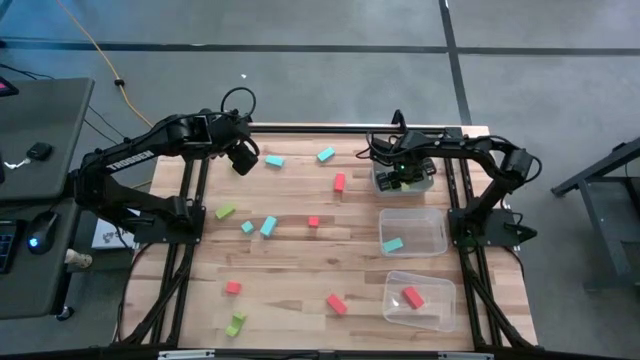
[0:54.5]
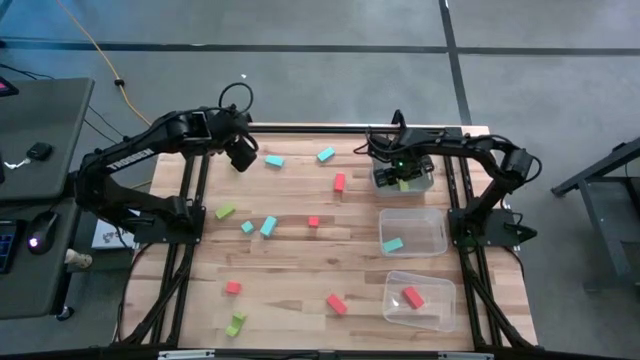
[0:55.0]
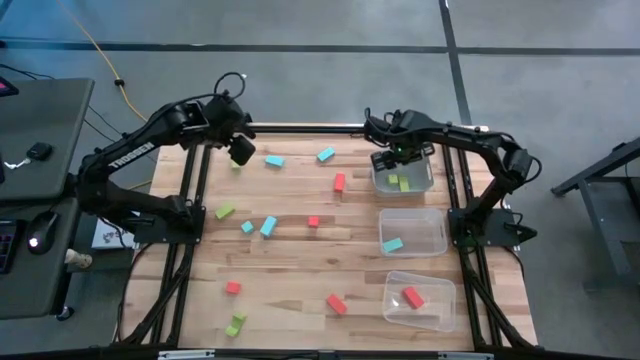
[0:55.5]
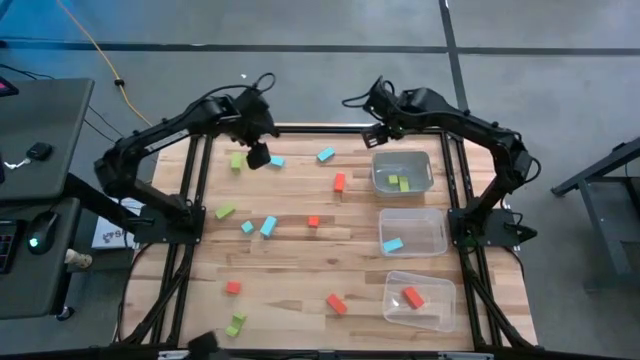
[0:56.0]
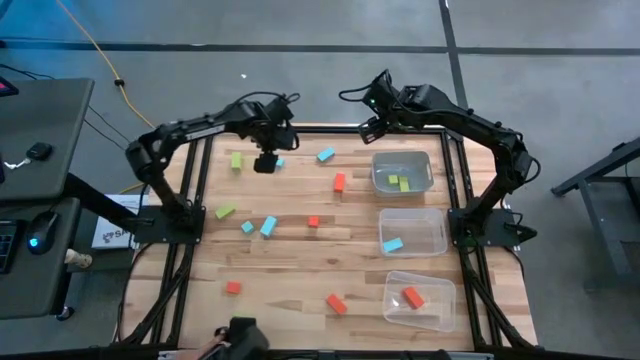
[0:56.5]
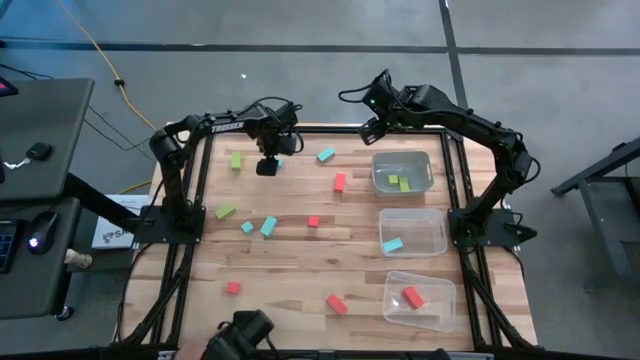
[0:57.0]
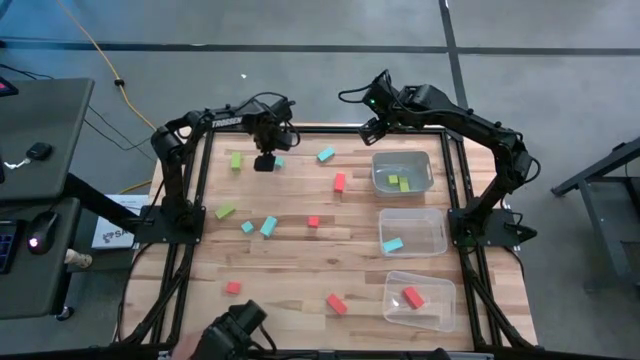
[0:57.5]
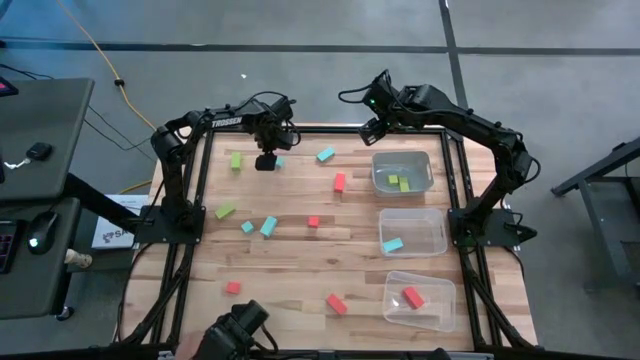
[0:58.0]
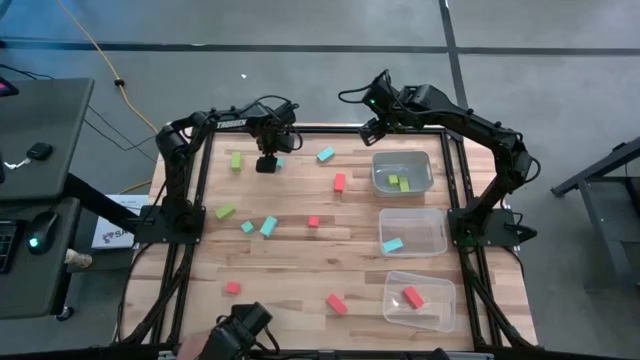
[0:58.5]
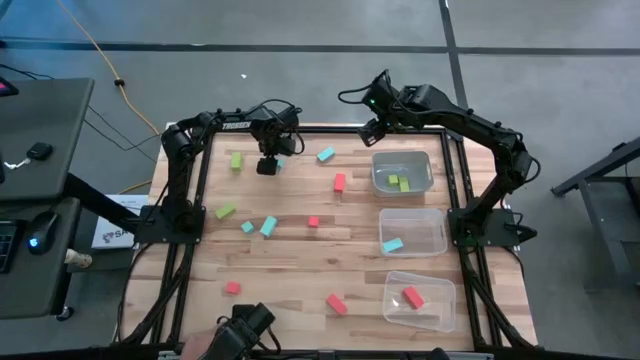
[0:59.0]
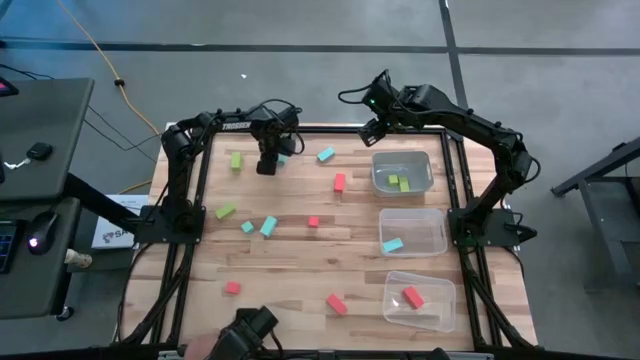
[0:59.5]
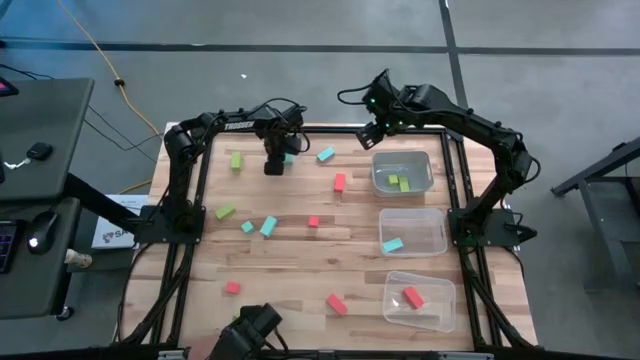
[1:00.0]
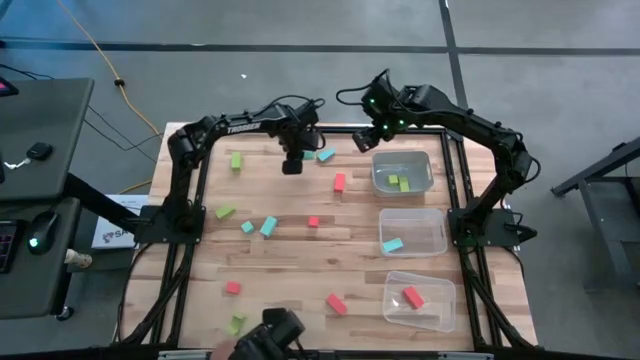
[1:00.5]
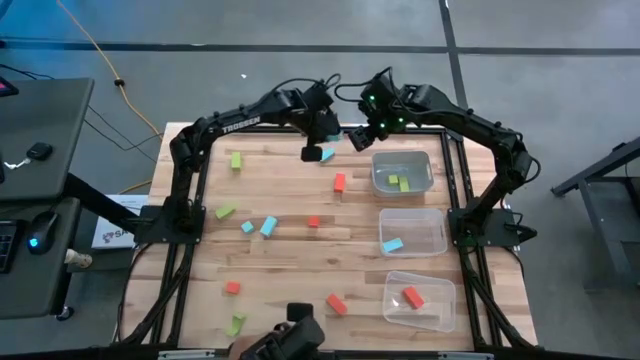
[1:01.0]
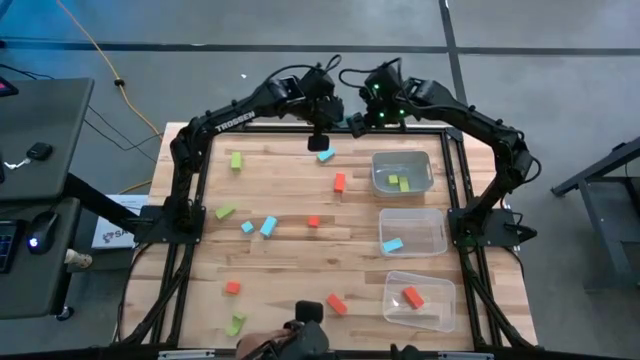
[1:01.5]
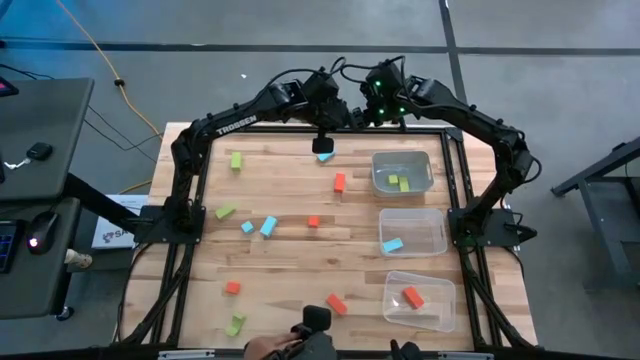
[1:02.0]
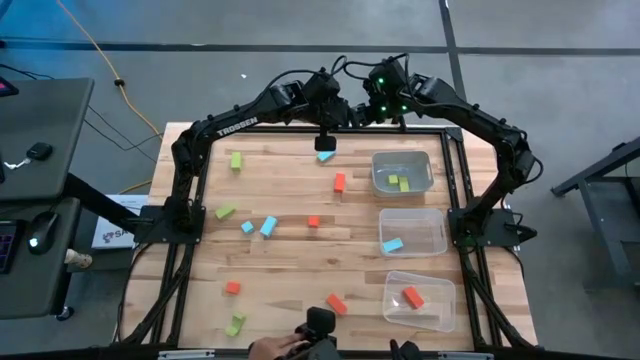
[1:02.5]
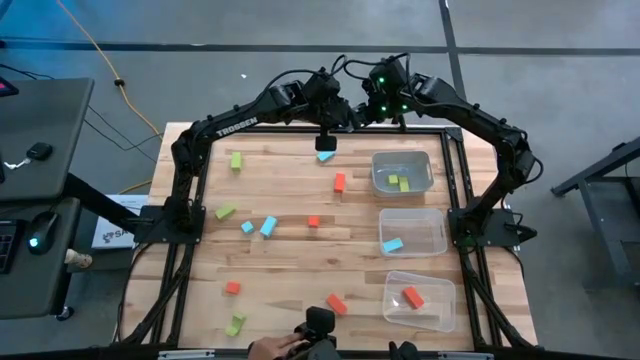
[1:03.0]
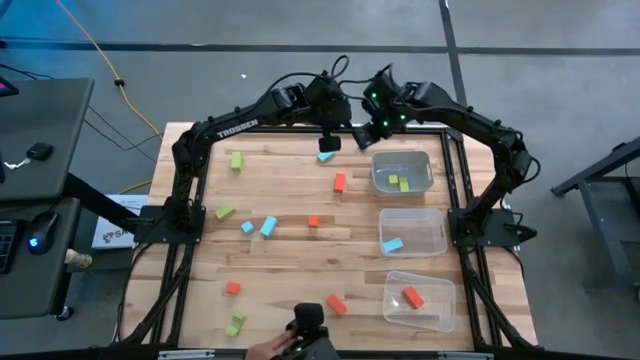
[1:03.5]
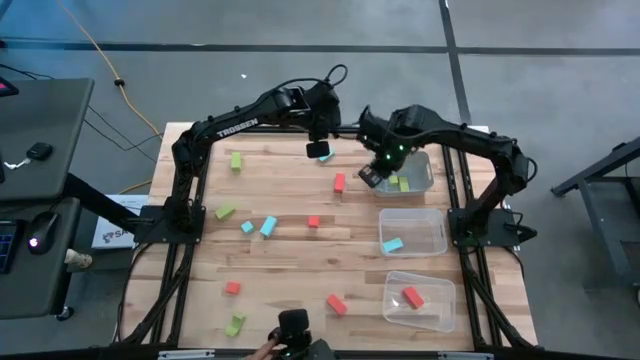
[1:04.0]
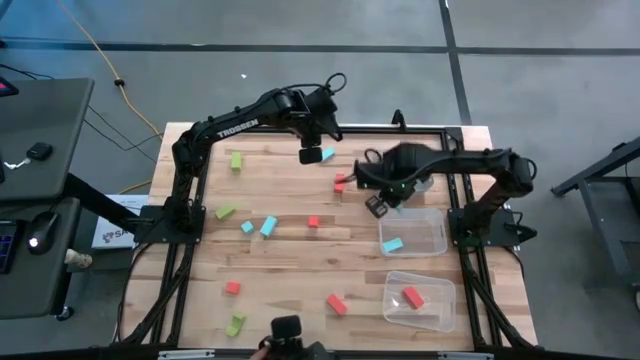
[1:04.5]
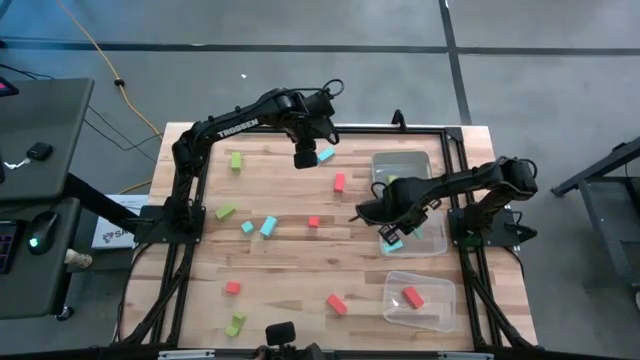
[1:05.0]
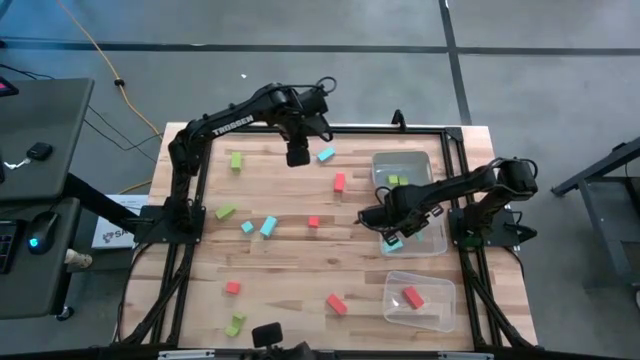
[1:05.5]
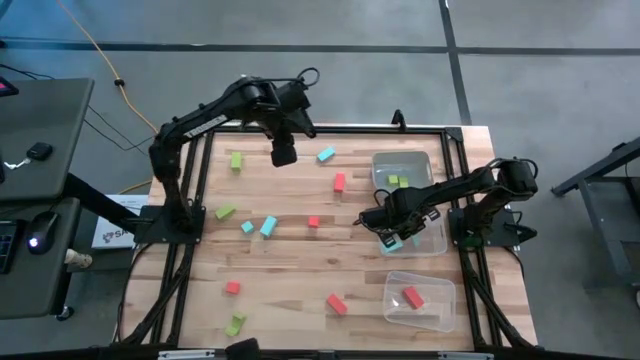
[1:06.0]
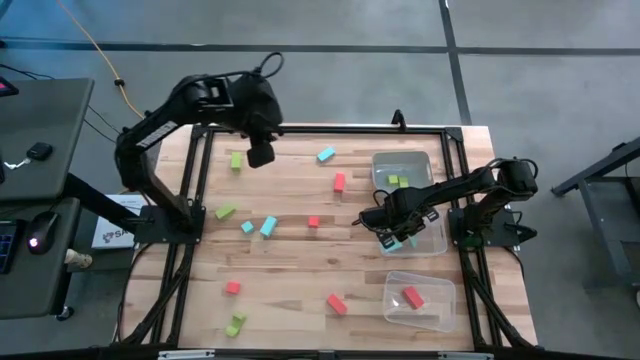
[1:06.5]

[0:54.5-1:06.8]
Task: Sort & place blocks by color
Put the light blue block into the top transparent bin

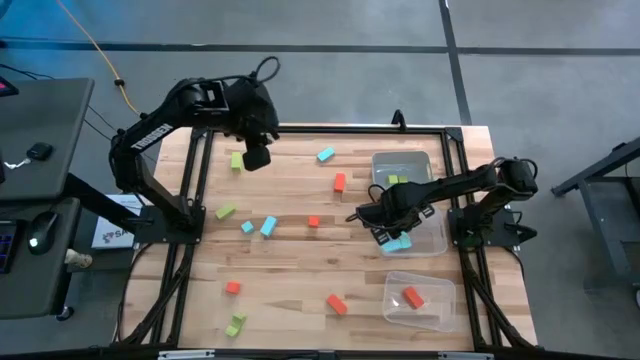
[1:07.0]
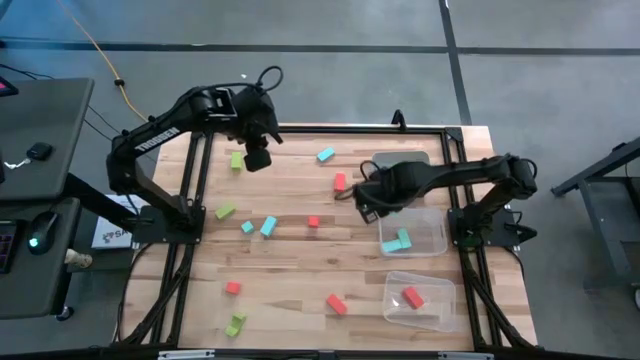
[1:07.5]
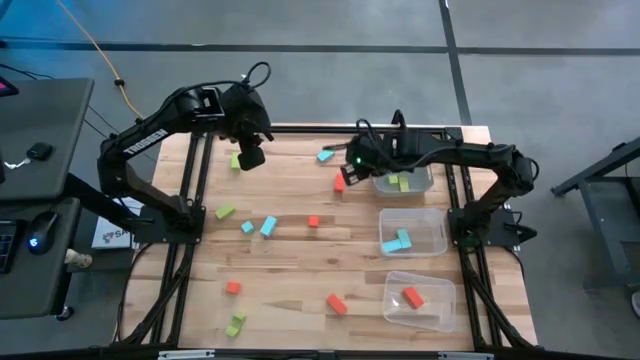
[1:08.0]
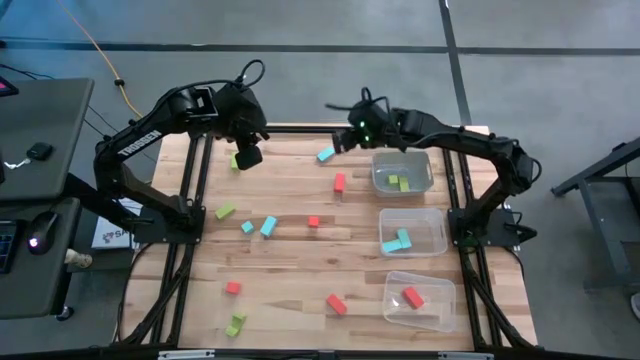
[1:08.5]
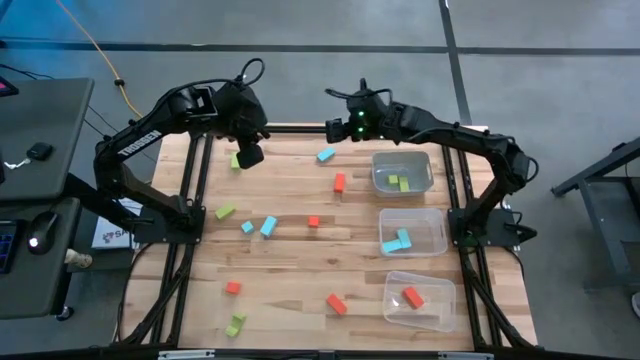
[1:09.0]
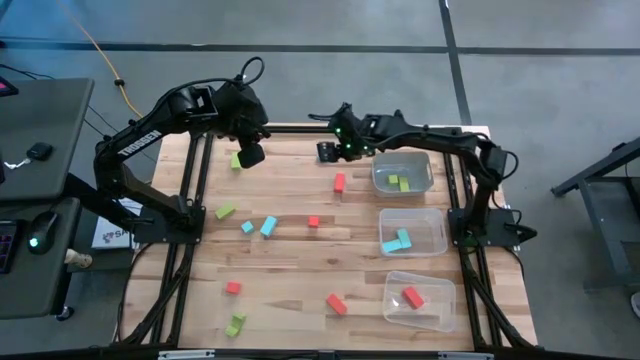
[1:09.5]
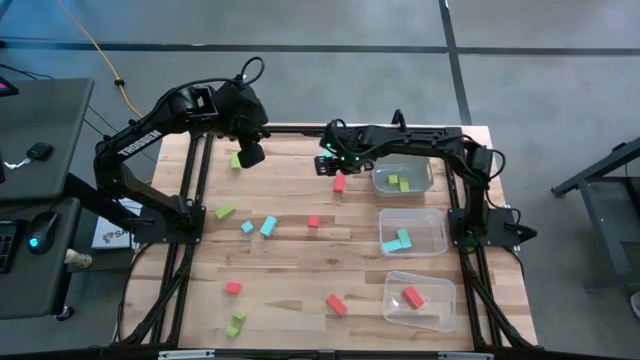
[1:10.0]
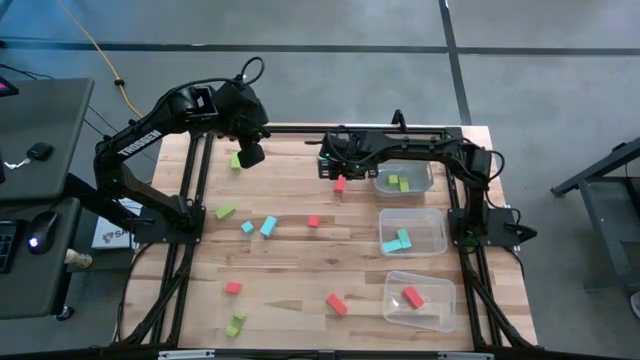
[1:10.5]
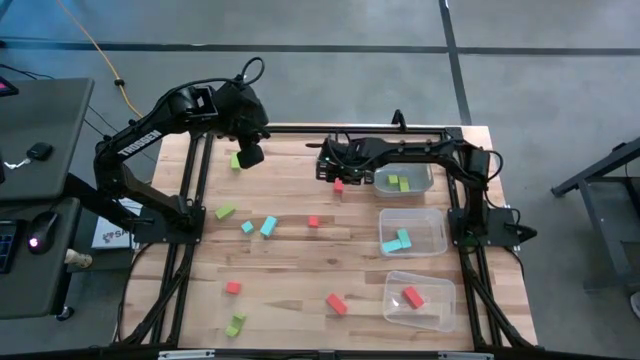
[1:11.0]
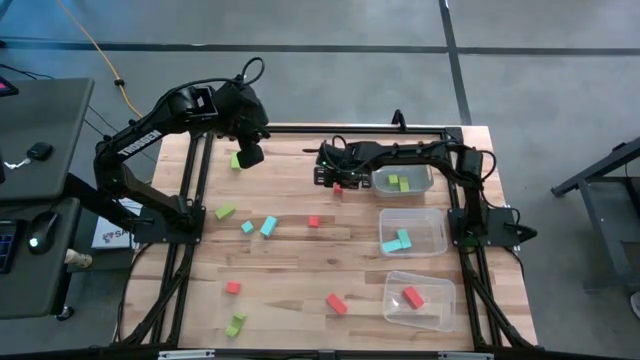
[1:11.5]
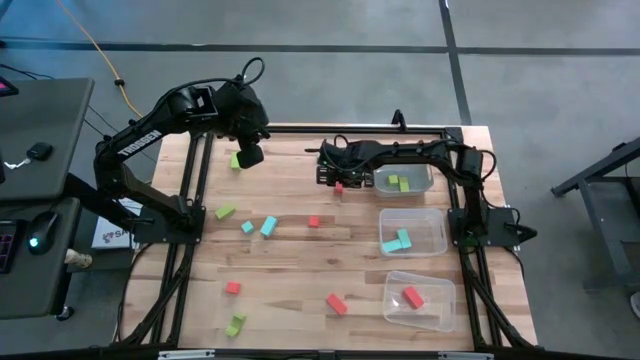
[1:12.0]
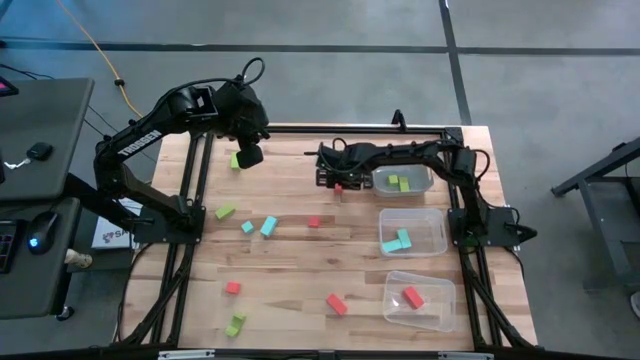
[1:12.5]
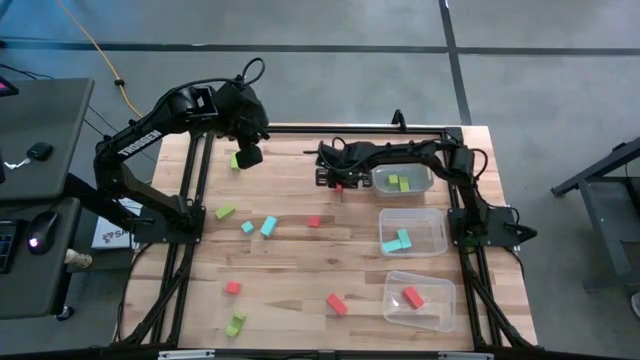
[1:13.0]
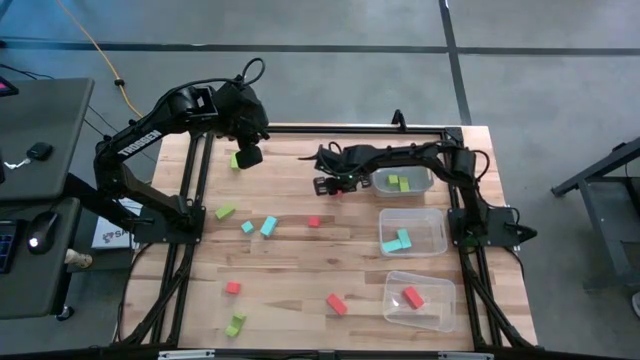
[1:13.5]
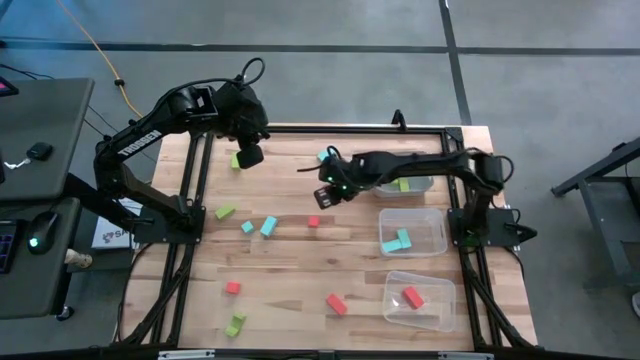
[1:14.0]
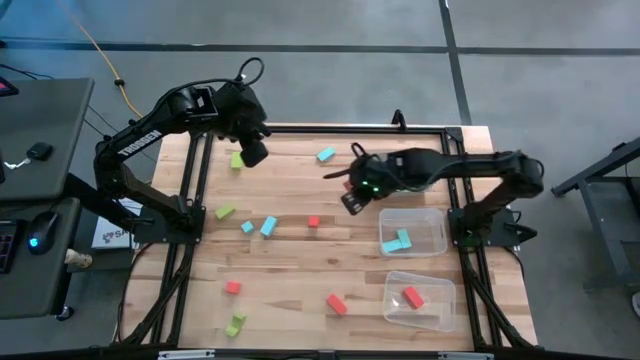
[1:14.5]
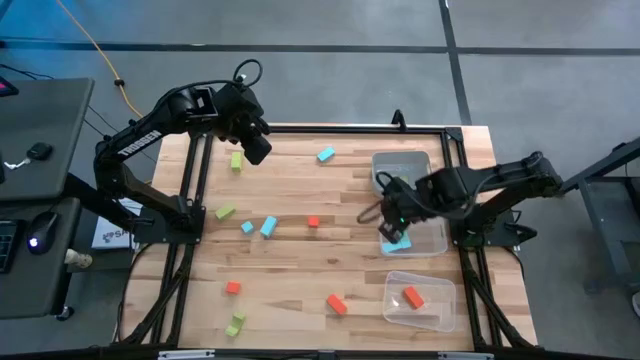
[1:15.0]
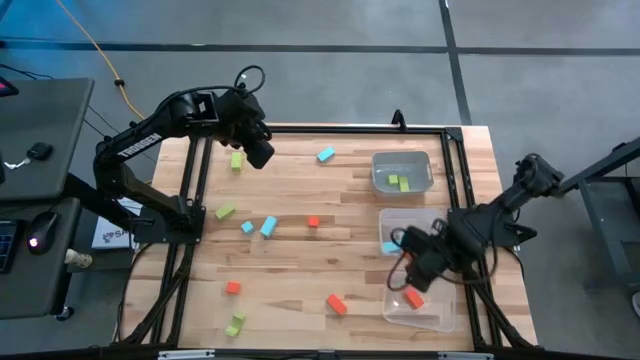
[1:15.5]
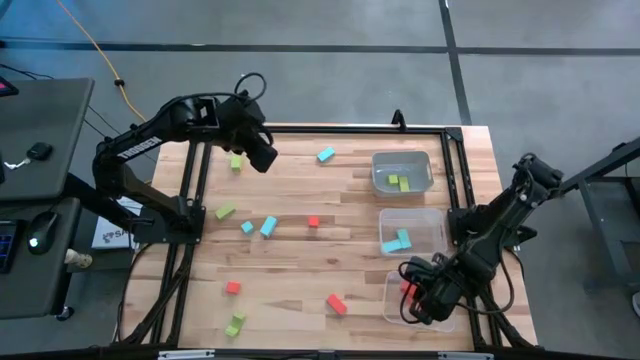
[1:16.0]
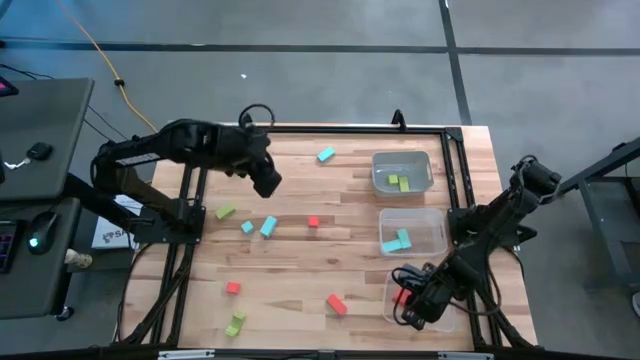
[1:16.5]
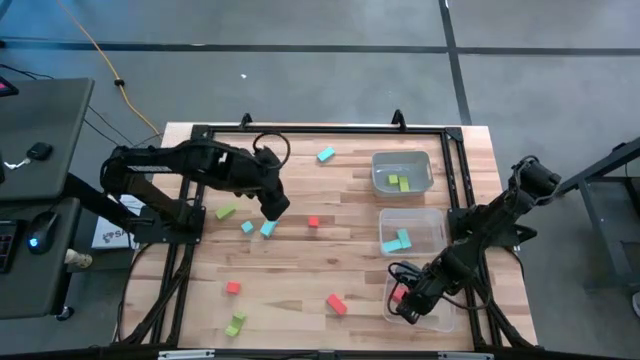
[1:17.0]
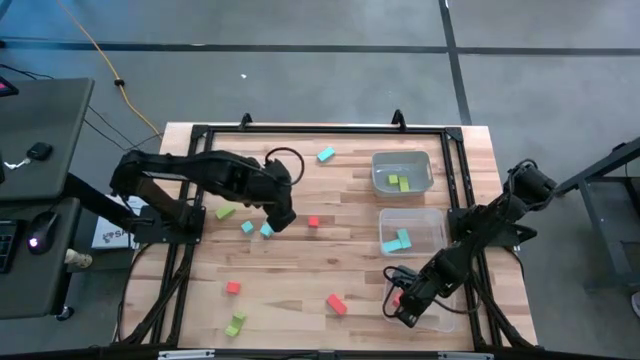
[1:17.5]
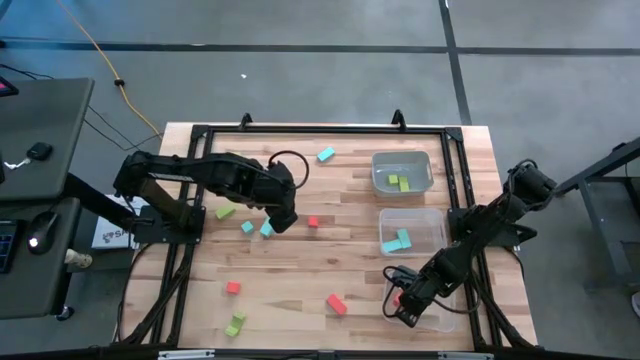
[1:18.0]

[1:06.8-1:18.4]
Put the orange block into the bottom transparent bin
